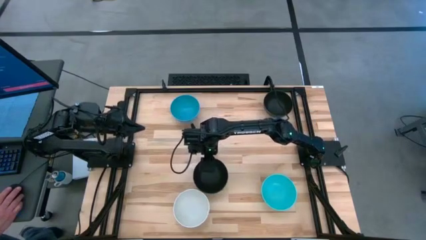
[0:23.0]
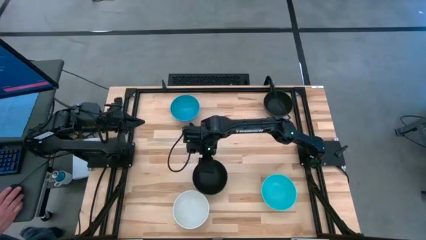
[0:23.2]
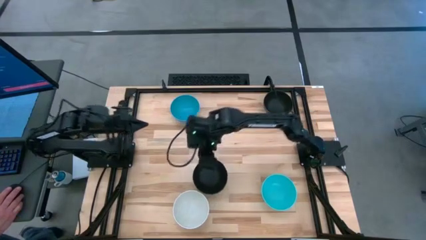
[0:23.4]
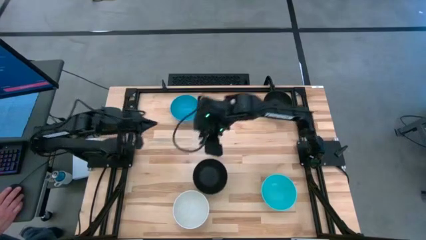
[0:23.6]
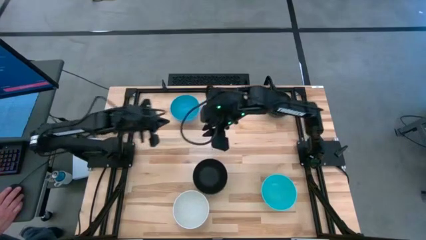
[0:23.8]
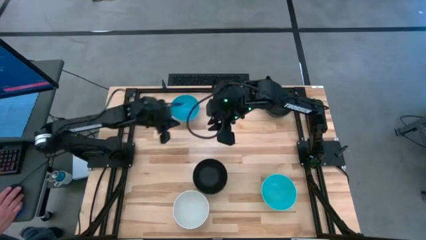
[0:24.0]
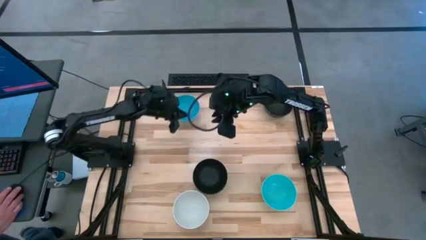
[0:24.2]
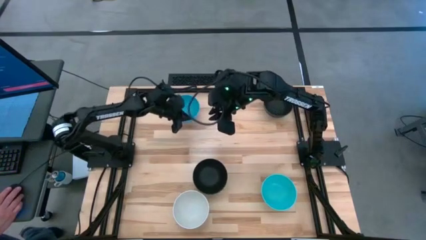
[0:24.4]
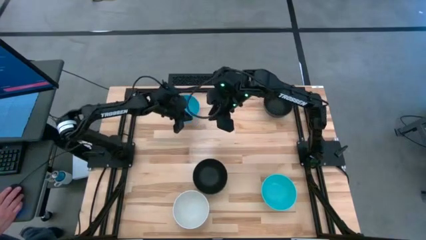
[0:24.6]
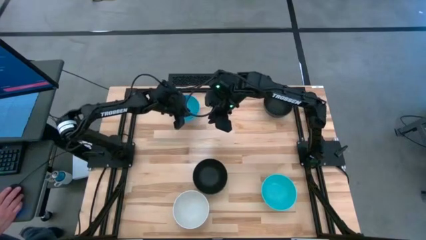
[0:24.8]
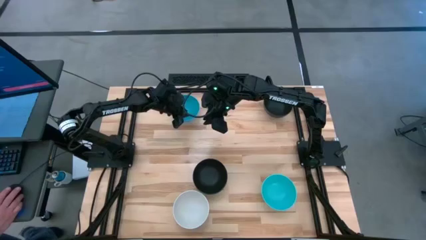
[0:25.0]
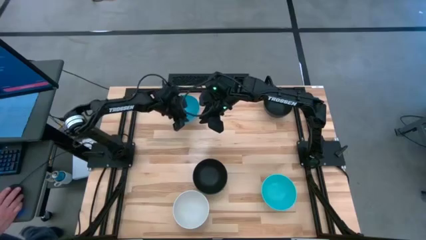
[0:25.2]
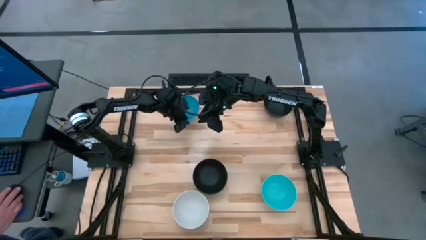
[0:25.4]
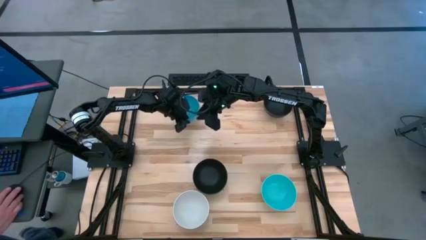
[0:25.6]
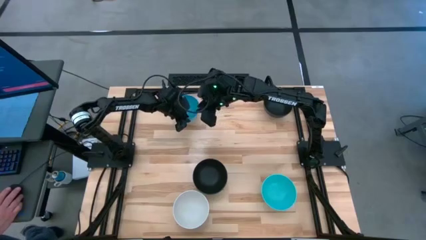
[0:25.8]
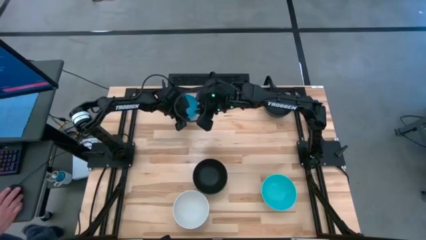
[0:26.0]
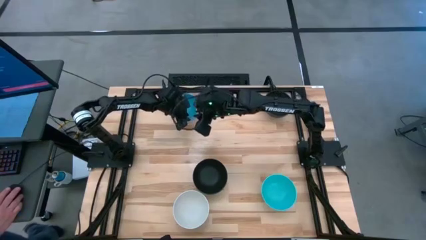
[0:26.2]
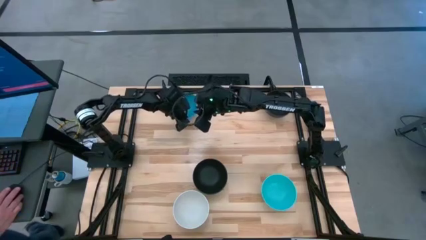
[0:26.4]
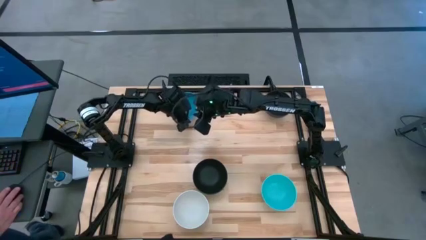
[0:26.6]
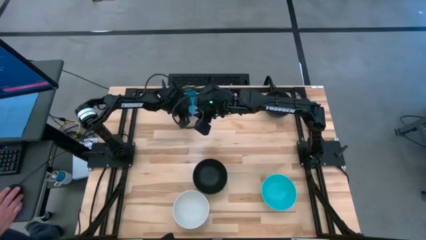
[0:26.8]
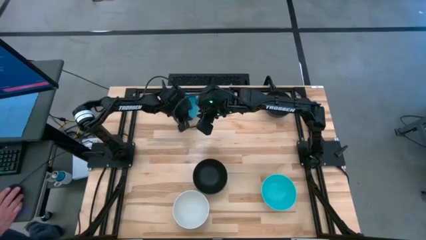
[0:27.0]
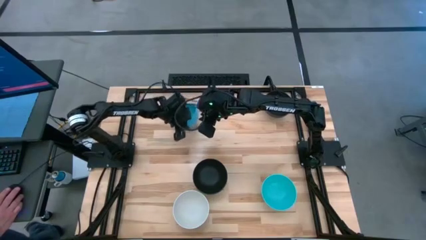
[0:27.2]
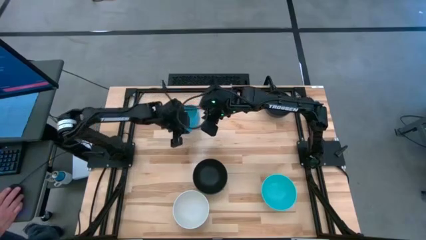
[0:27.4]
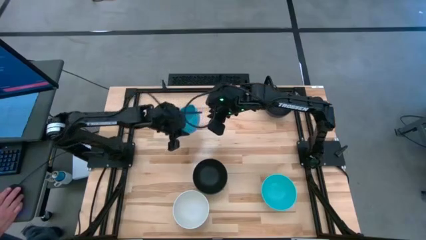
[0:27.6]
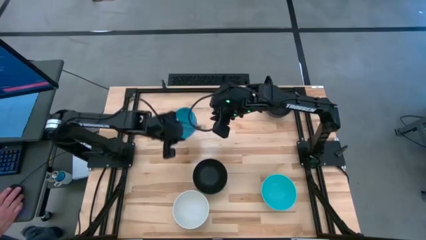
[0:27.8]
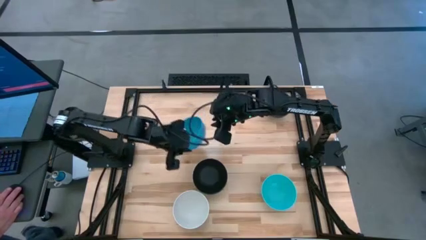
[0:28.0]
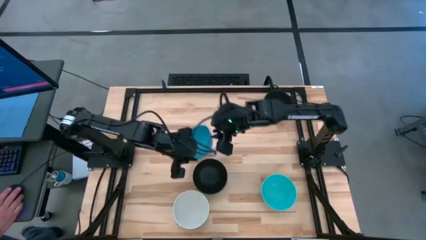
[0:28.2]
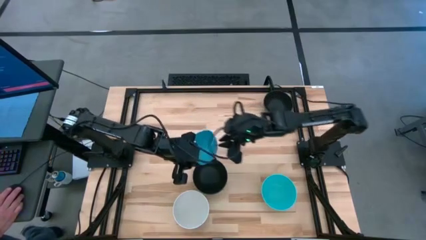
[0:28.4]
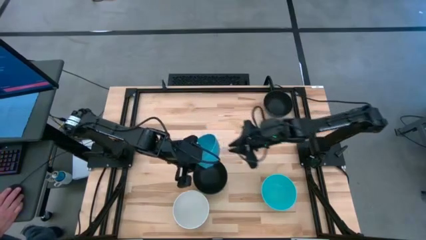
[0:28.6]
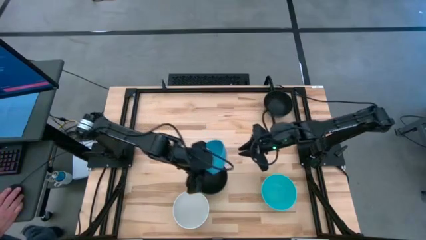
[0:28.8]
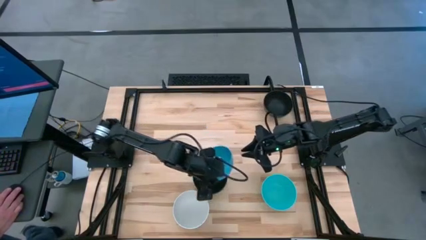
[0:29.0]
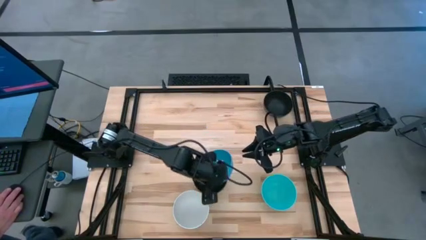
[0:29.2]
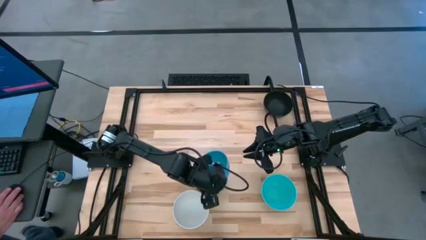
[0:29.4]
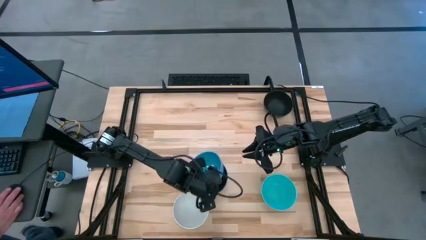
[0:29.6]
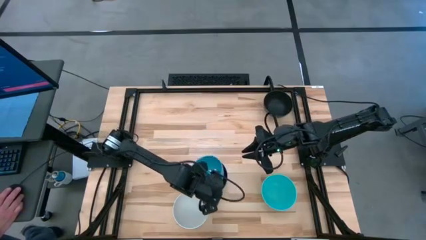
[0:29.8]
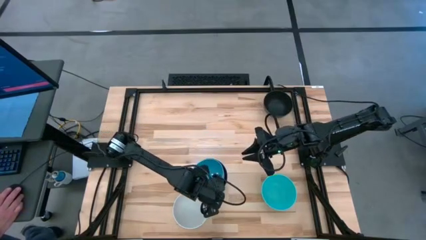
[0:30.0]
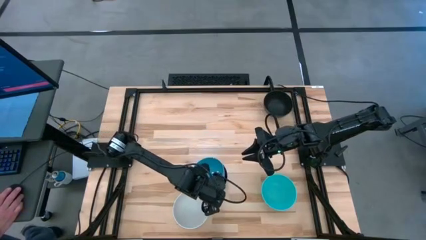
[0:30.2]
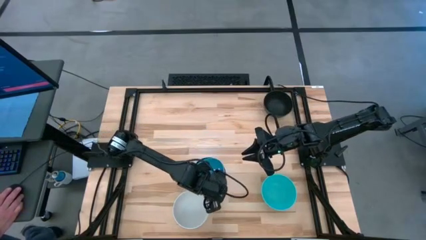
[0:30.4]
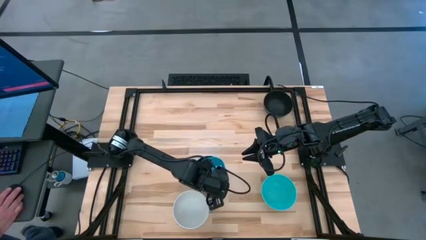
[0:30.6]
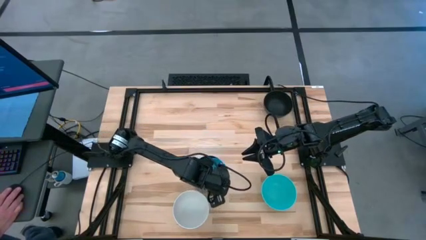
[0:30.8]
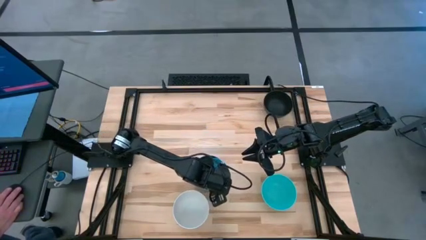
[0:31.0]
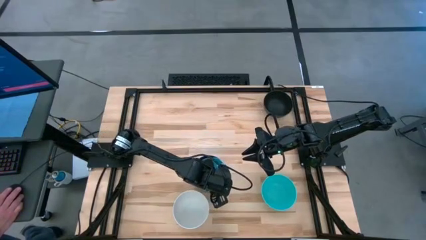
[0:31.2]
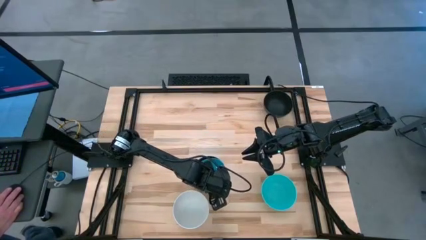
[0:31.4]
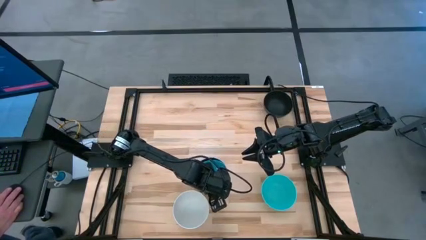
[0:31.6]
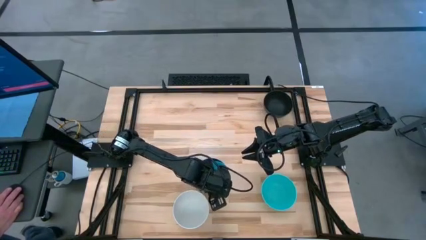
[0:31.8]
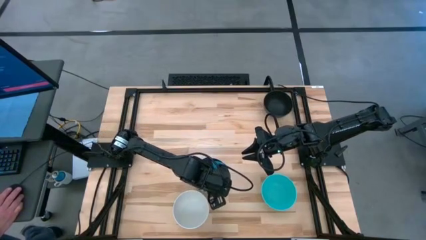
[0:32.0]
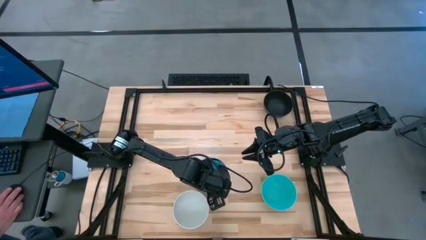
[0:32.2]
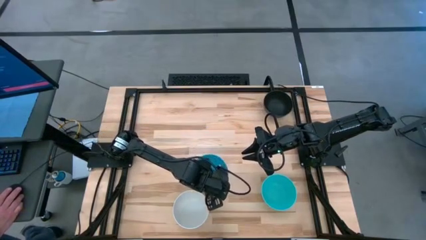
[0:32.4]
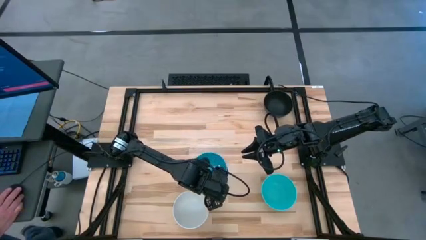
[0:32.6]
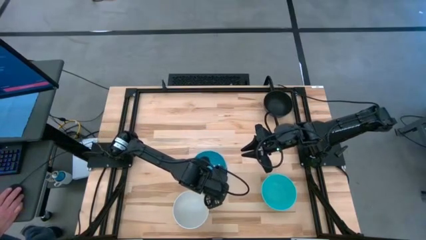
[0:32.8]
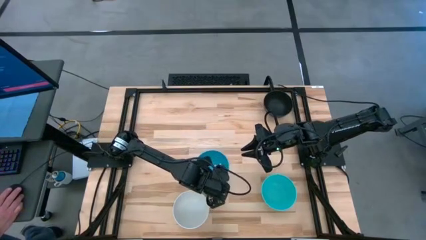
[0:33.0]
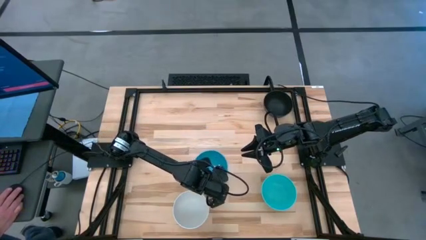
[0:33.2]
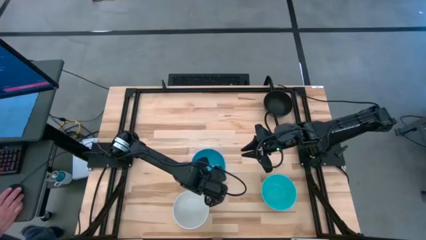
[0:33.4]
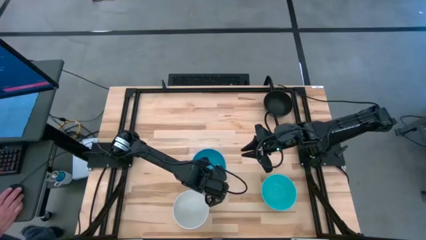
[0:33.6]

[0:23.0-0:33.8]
Task: Nest bowls inside each other
Stack the light blue bowl on the black bowl

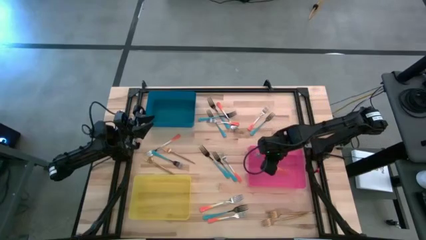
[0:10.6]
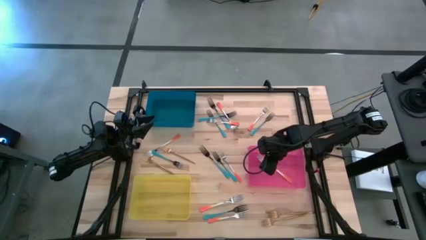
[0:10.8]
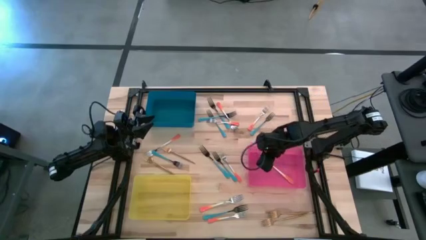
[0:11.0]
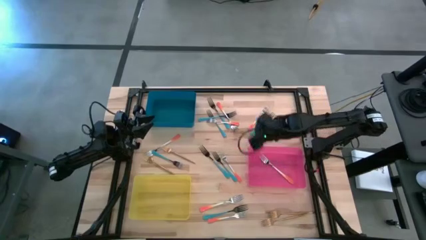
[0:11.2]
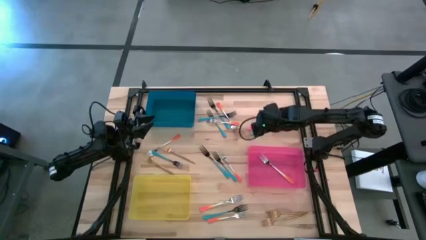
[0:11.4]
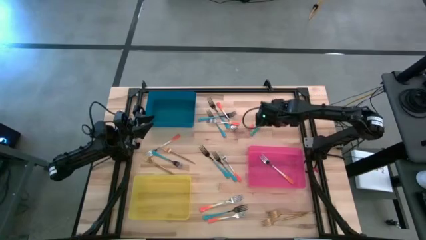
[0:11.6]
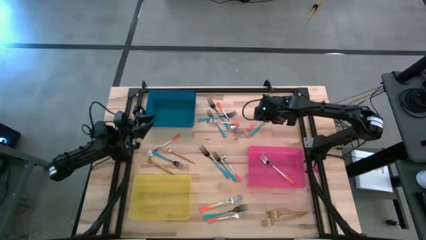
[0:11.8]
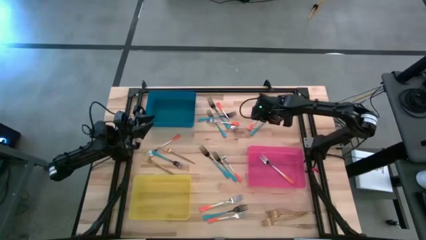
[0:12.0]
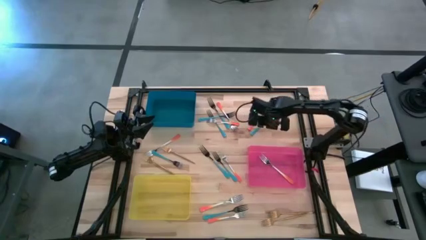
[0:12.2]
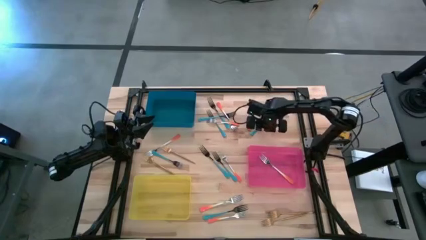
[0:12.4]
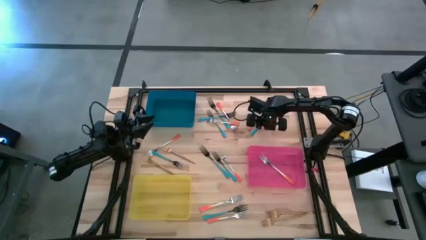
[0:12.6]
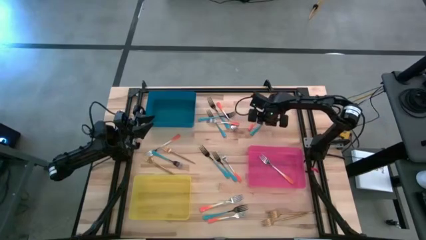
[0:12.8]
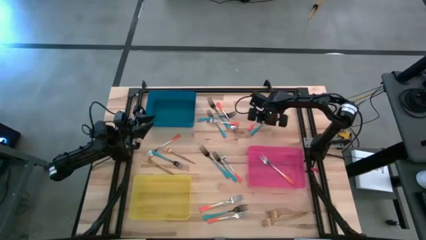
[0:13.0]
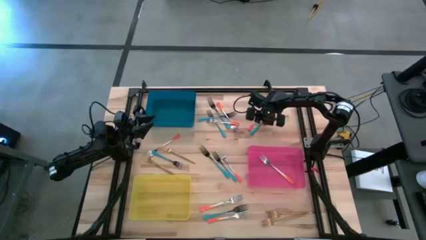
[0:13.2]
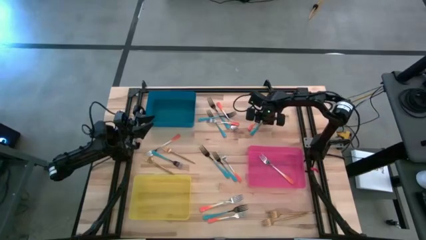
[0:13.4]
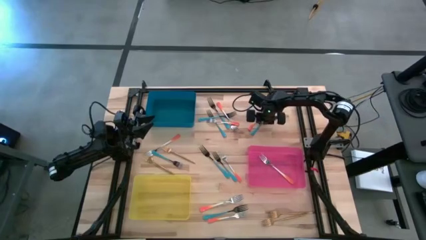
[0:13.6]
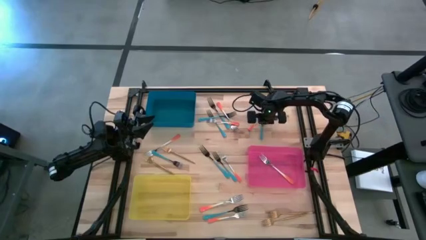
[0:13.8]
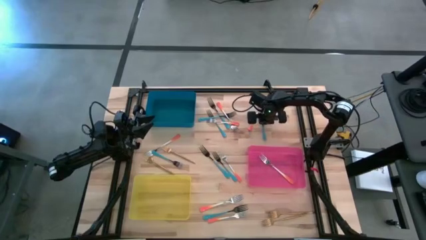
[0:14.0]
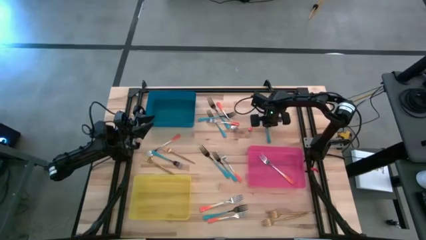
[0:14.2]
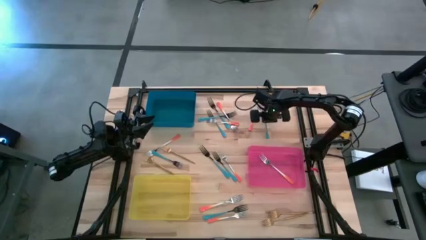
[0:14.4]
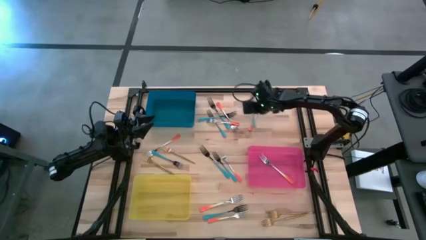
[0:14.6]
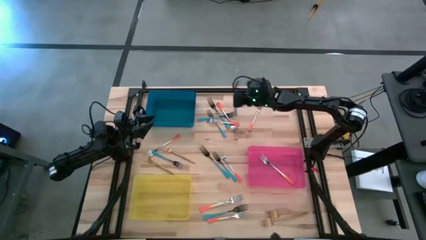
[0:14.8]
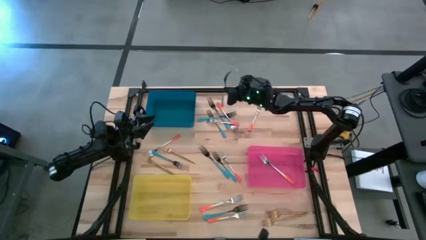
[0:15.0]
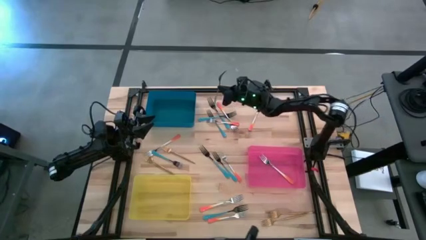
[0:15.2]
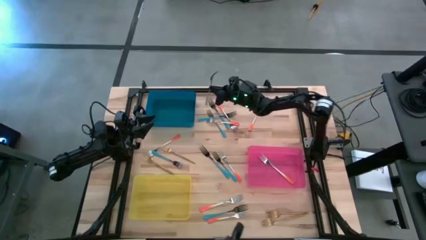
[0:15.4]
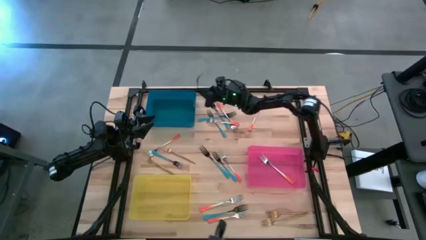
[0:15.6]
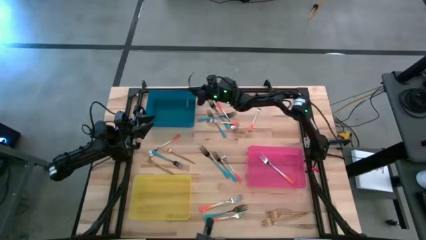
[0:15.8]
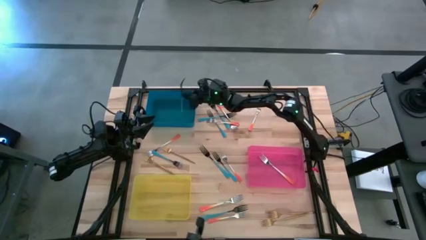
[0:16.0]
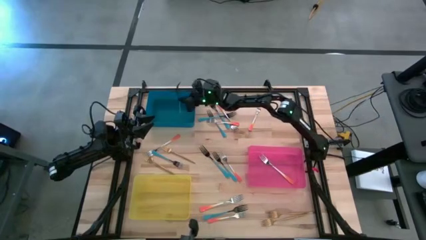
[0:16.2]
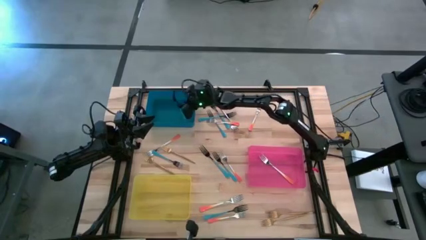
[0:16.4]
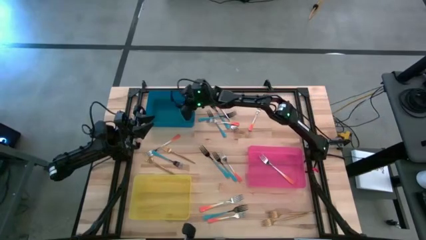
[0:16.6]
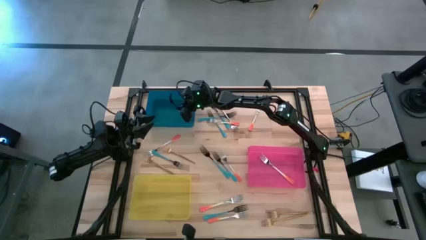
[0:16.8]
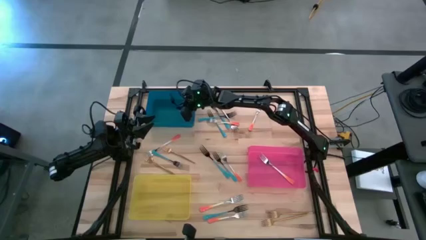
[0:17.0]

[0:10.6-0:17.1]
Task: Sort silverware by color (type)
Put the blue fork into the blue bin
